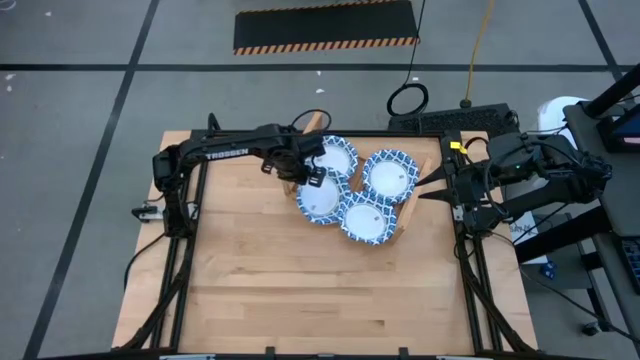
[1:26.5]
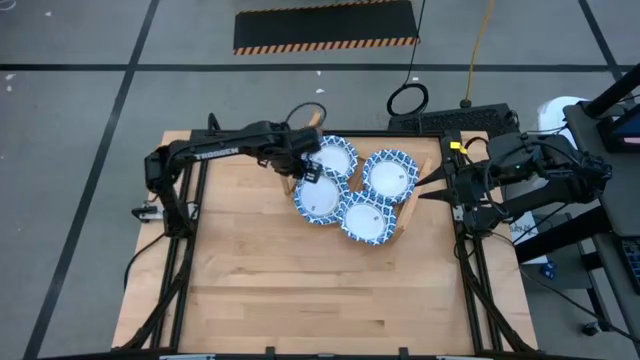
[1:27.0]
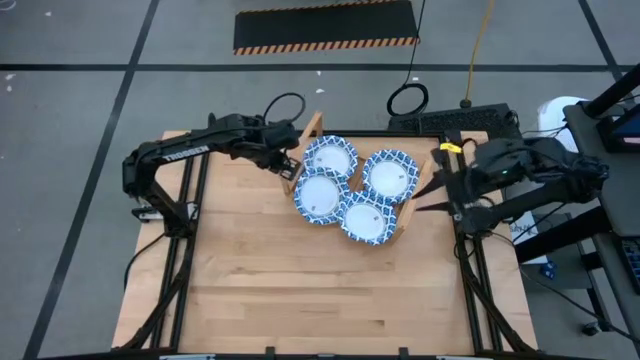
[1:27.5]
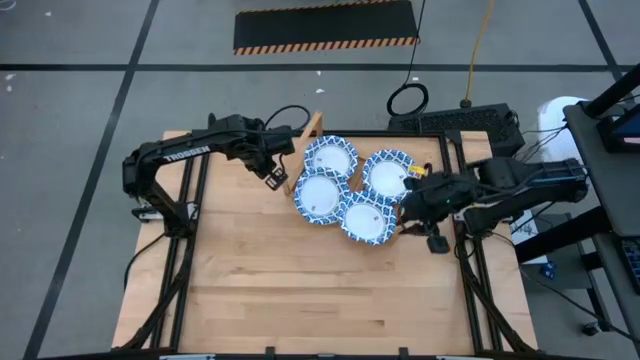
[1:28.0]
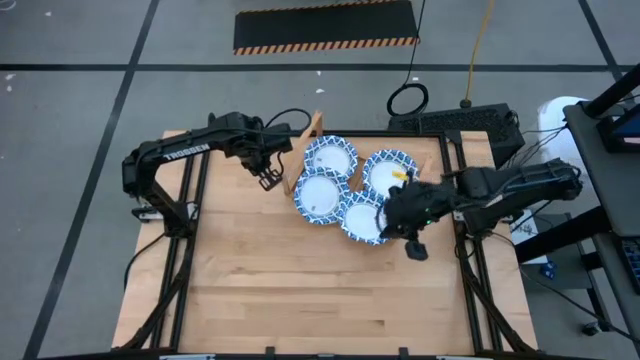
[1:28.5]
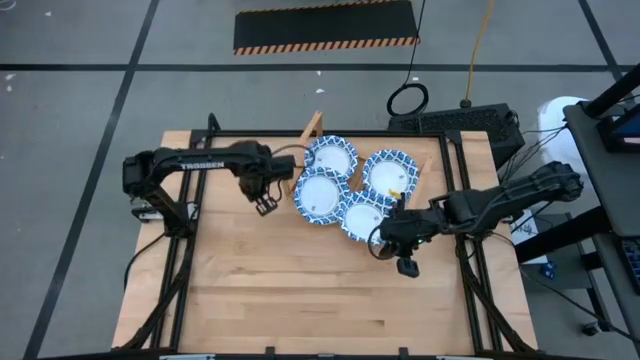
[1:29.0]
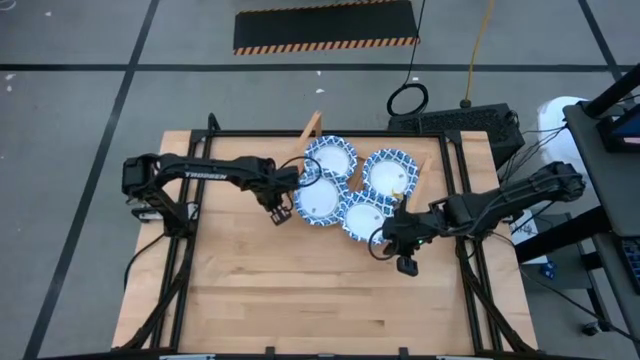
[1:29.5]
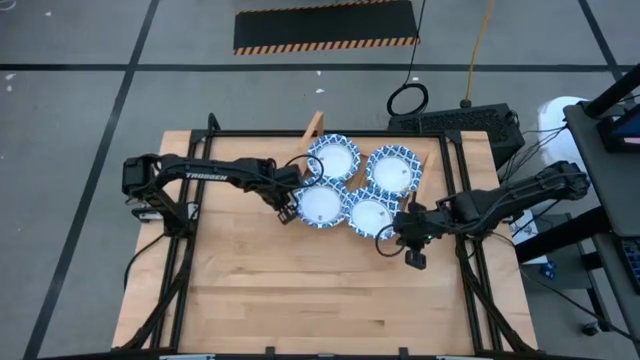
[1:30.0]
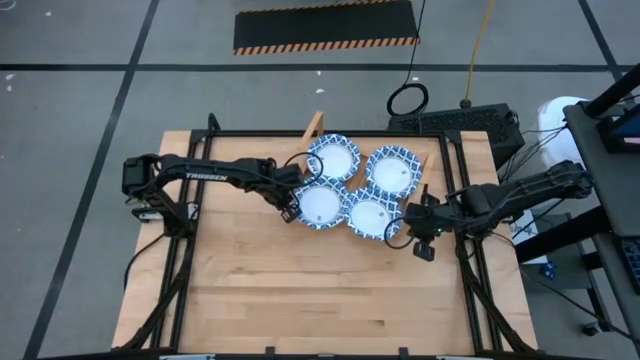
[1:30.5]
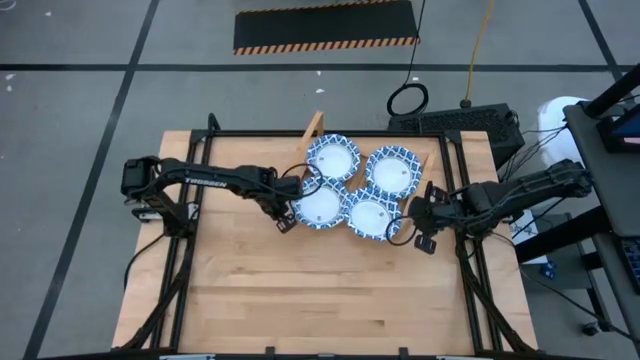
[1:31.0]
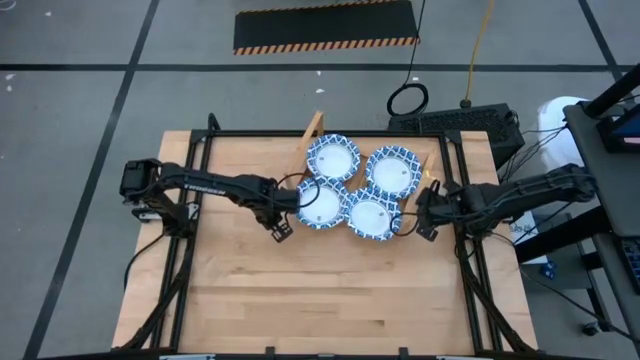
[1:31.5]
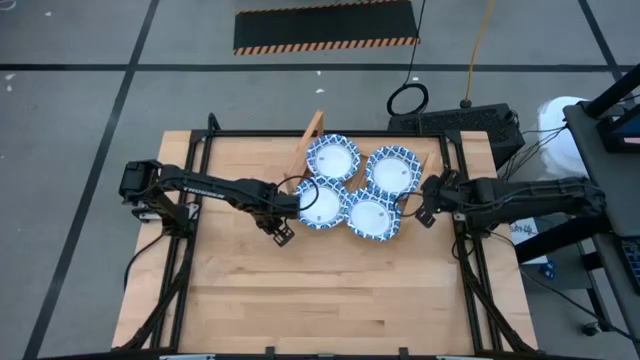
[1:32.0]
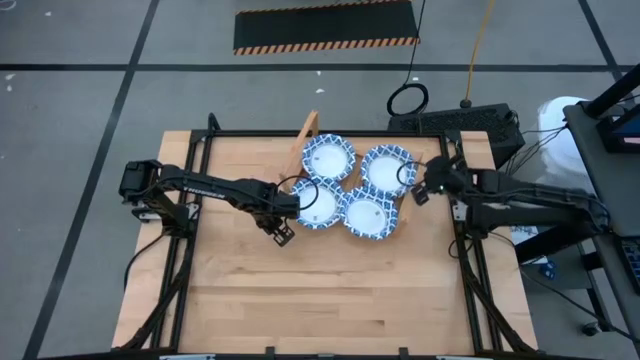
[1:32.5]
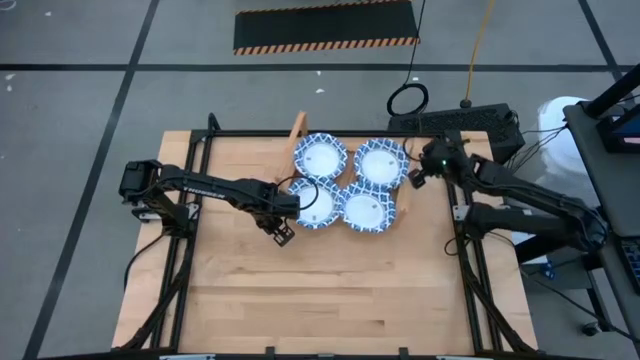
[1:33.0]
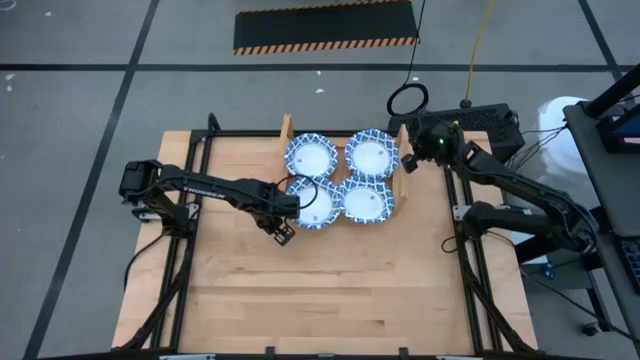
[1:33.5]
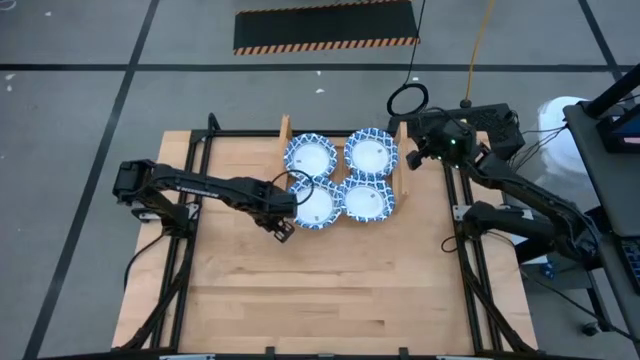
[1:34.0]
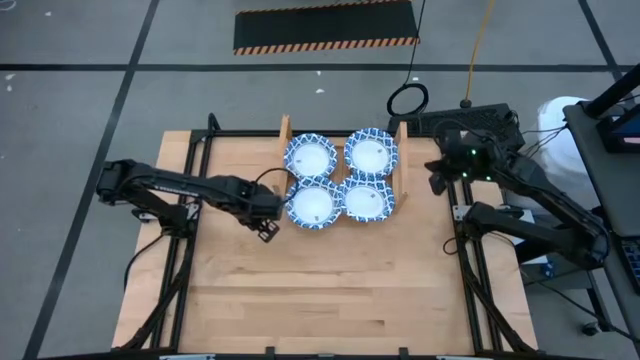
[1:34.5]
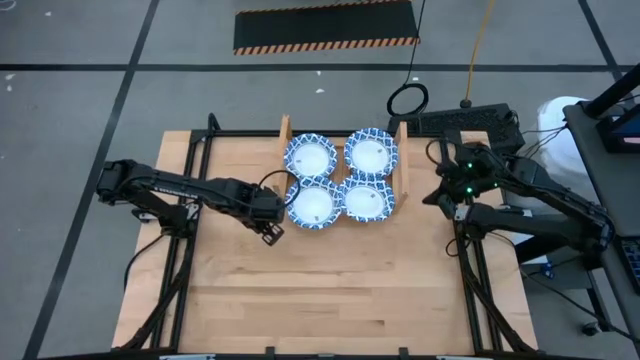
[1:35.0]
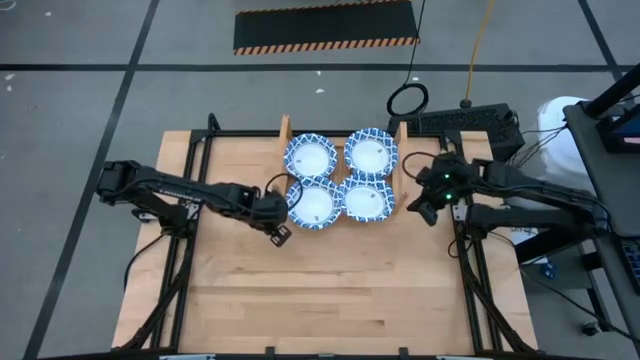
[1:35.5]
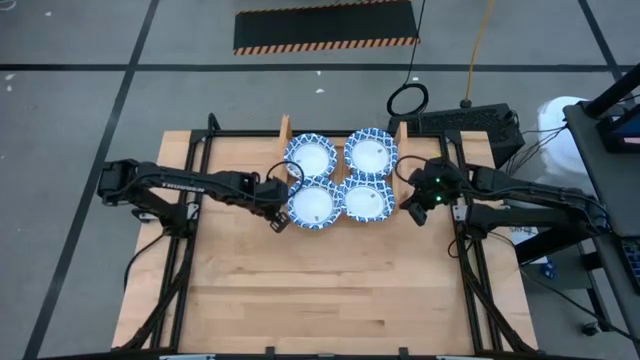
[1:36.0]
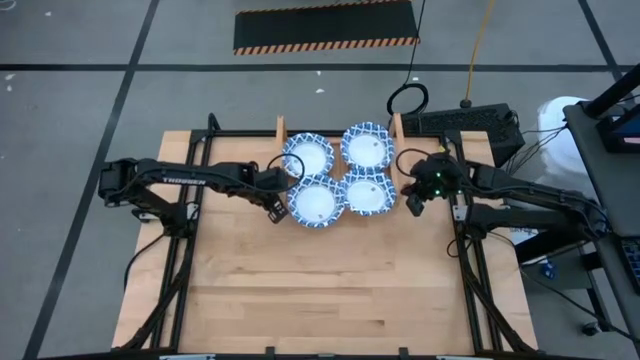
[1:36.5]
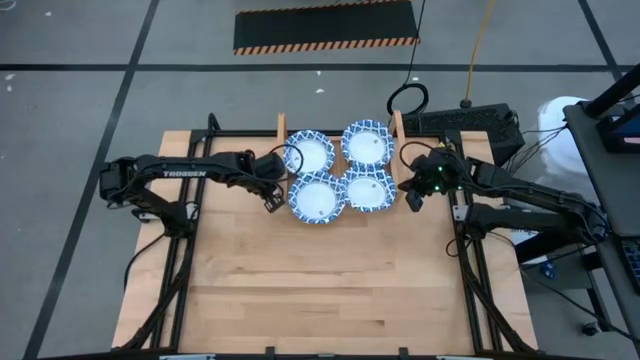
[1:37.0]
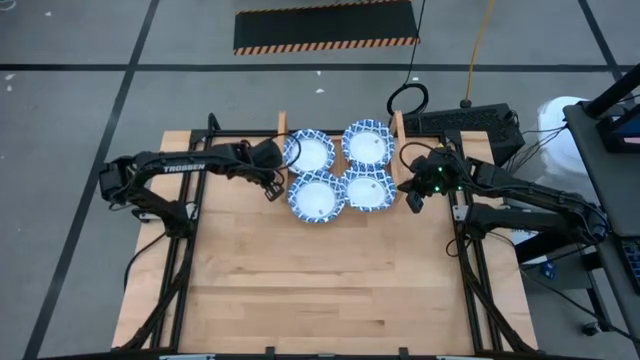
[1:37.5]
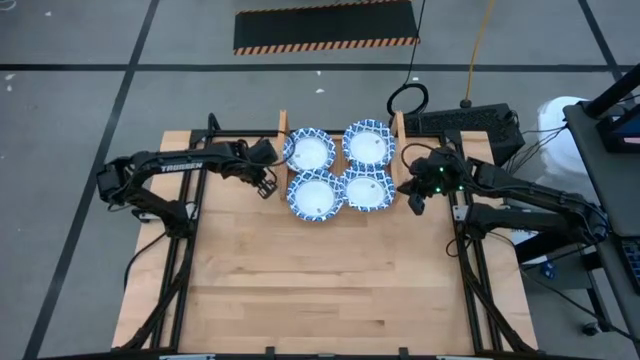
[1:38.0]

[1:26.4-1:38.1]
Task: Place and stack bowls onto a shelf
Adjust the shelf in the center

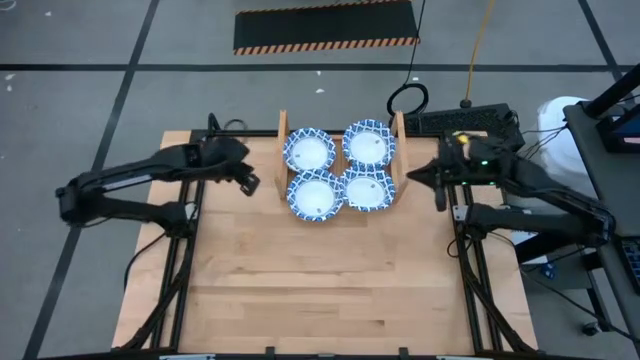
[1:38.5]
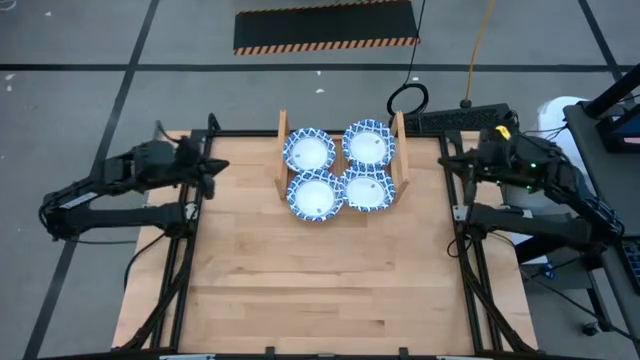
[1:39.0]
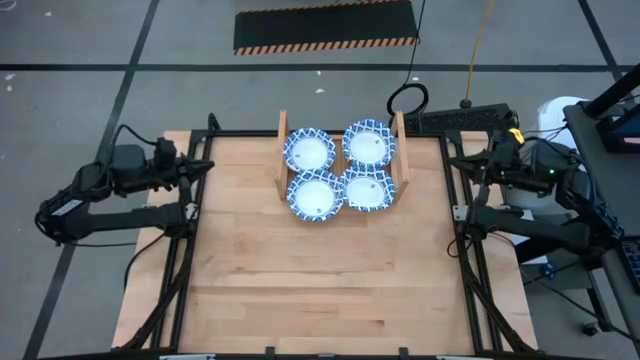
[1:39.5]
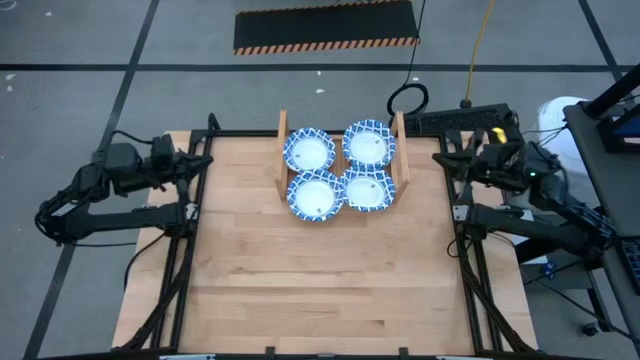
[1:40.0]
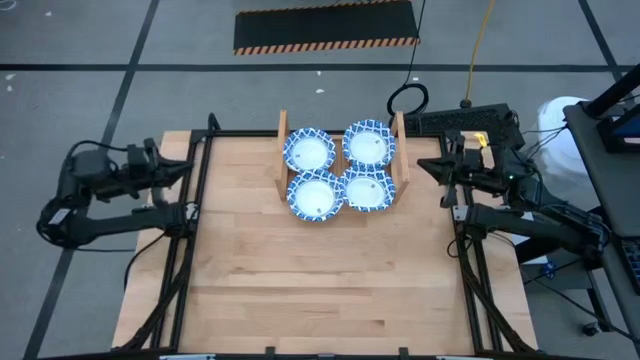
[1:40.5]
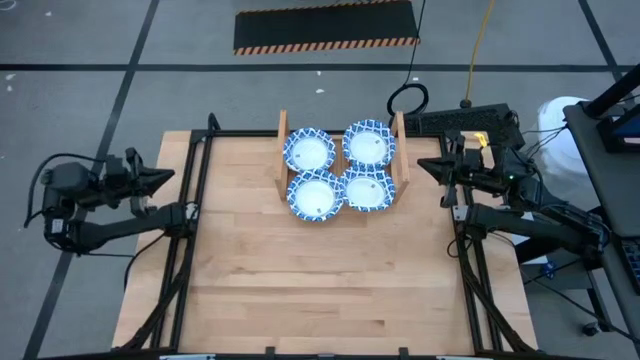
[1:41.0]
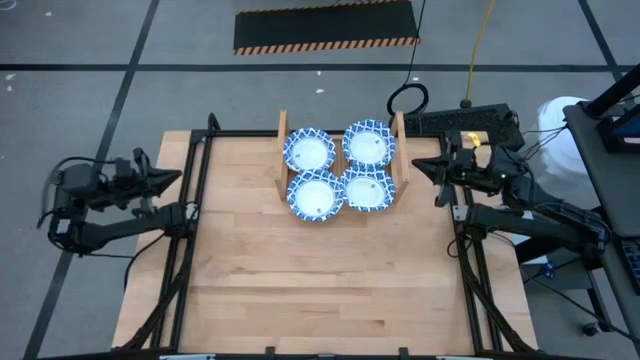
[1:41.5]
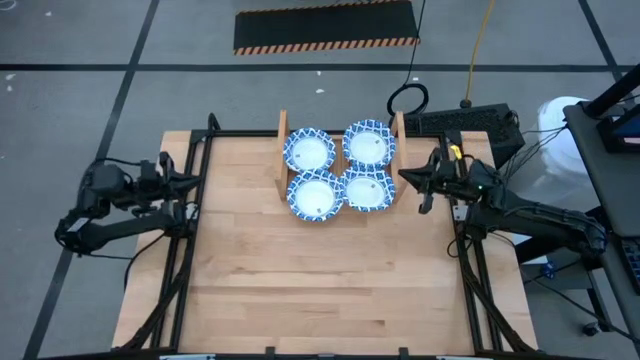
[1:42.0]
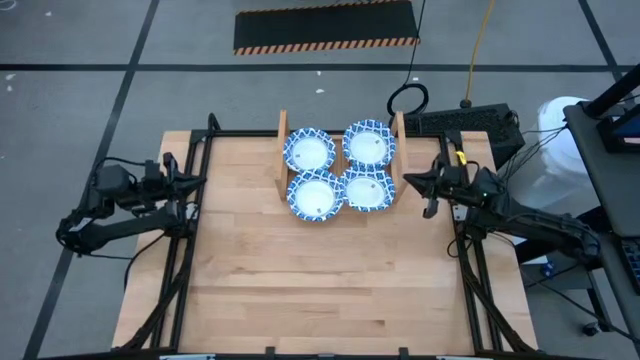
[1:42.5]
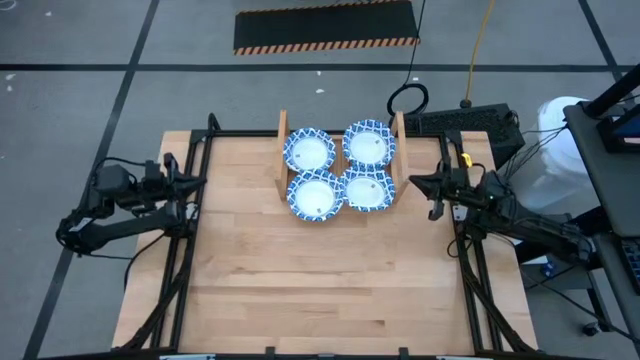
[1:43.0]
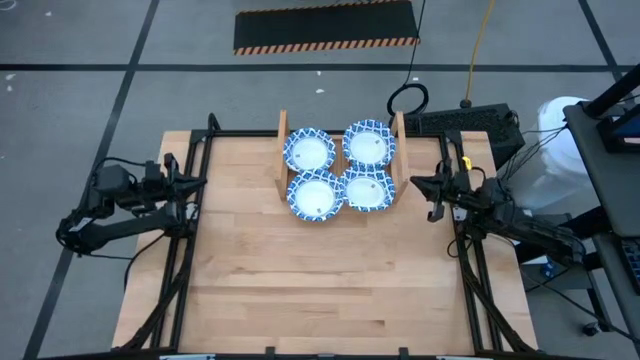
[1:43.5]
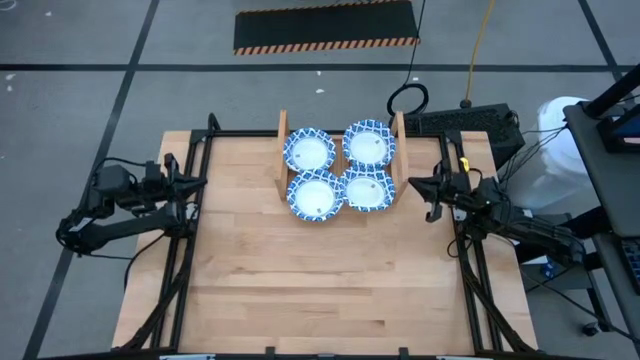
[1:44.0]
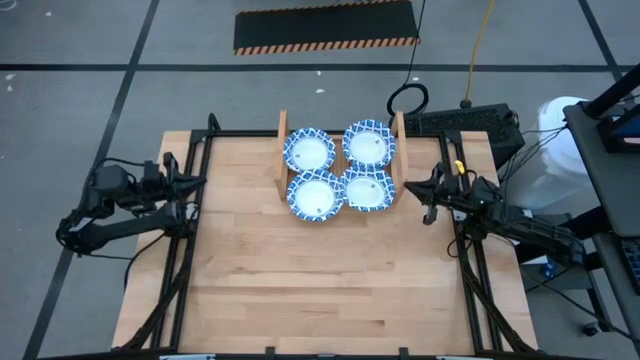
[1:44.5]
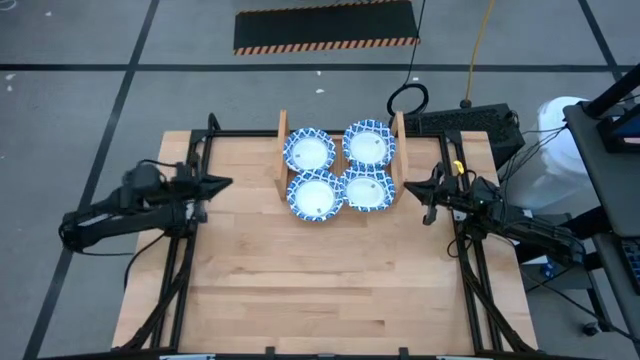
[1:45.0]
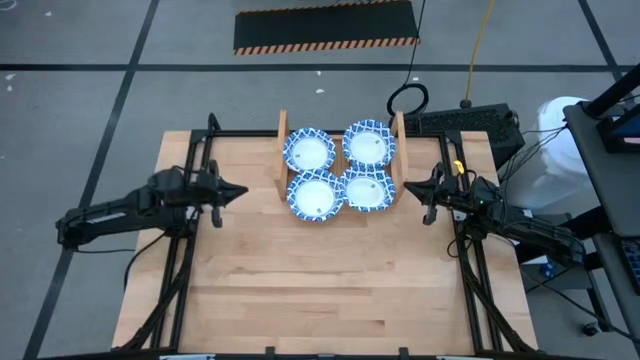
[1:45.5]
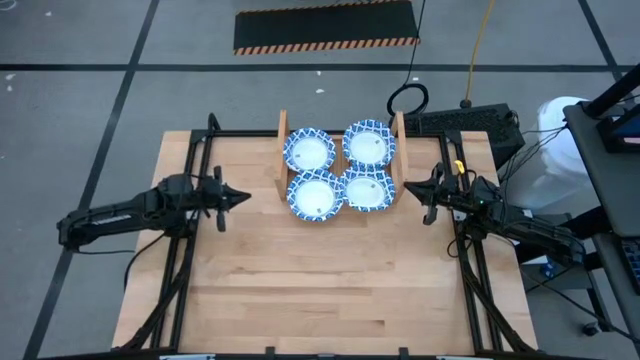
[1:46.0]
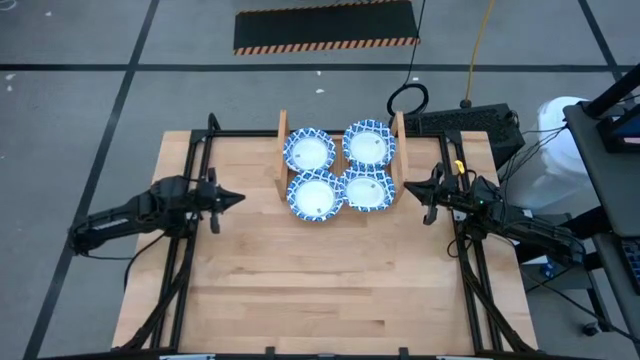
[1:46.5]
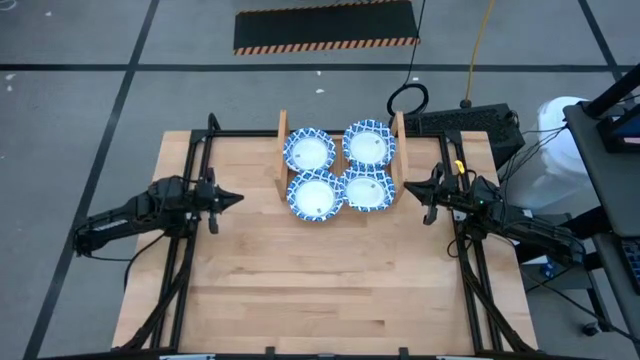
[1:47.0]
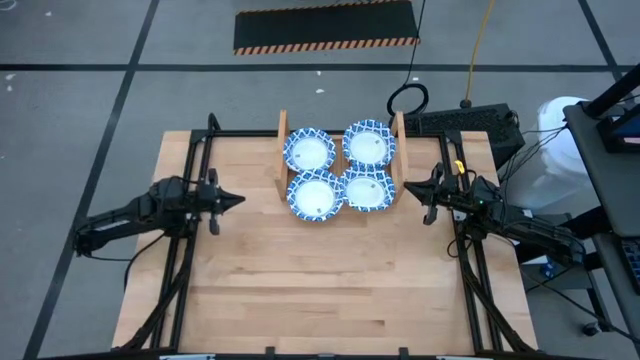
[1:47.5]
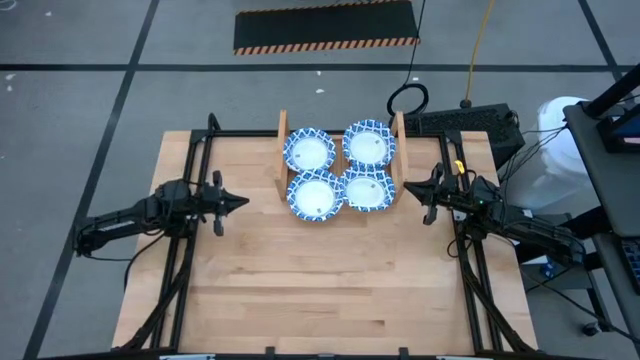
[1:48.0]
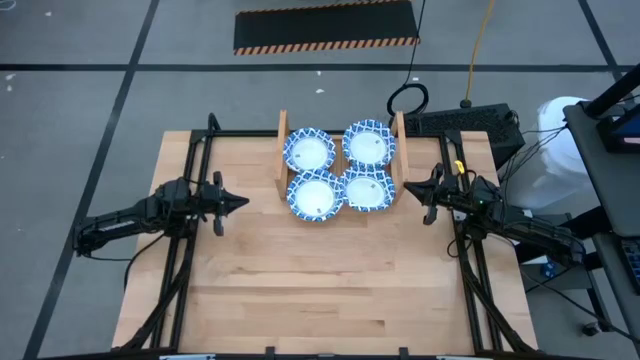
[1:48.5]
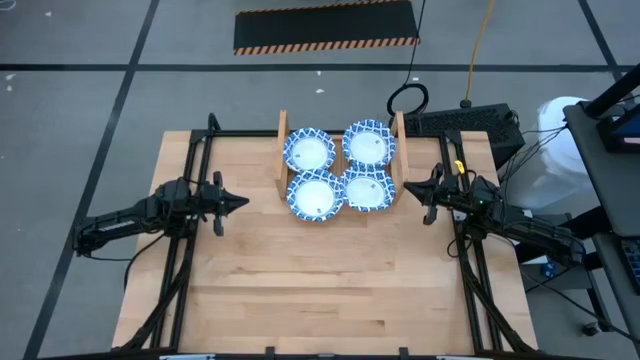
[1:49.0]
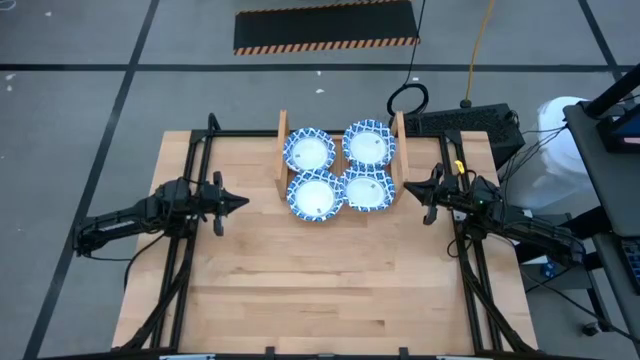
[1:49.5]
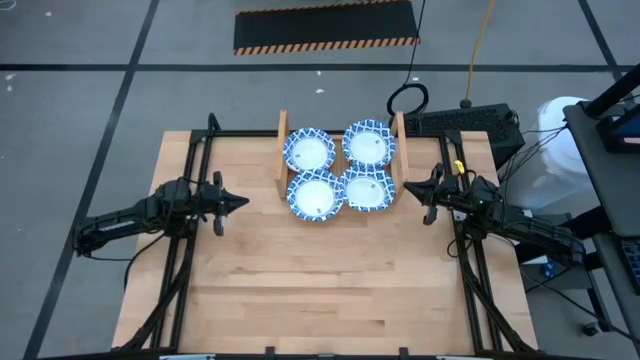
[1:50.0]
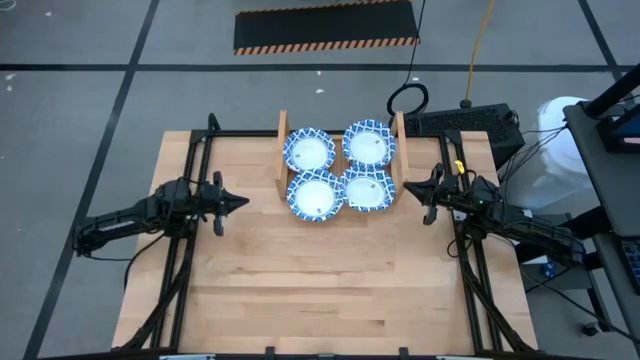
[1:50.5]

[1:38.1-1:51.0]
Return to Home Position
